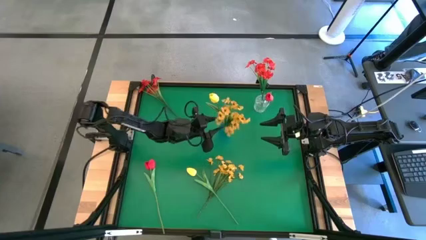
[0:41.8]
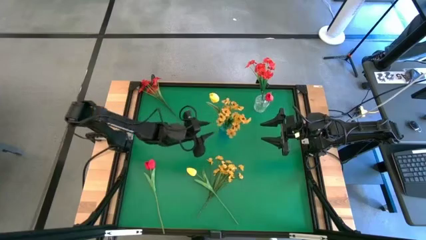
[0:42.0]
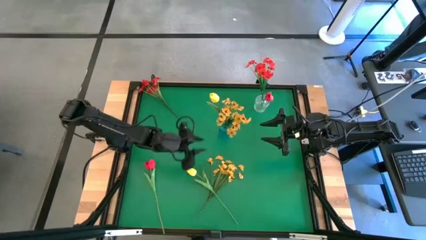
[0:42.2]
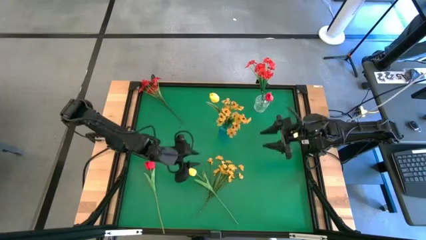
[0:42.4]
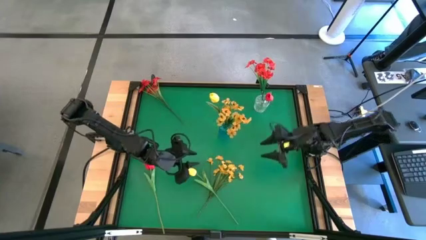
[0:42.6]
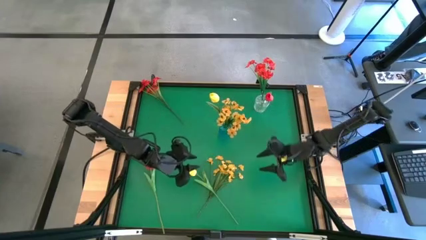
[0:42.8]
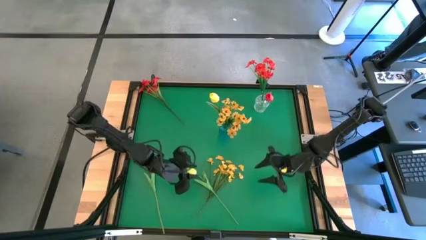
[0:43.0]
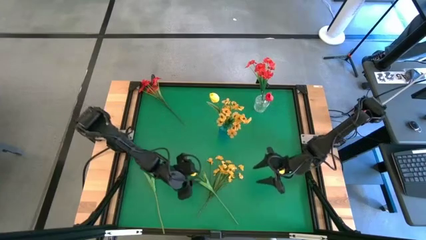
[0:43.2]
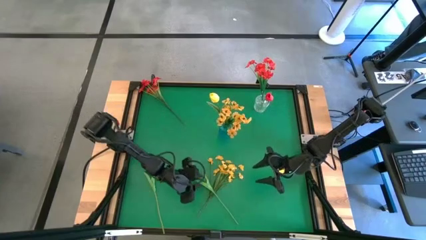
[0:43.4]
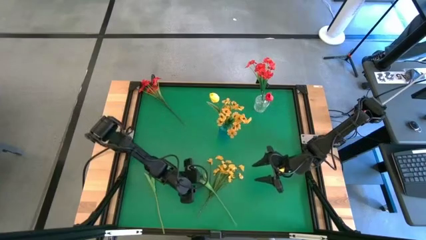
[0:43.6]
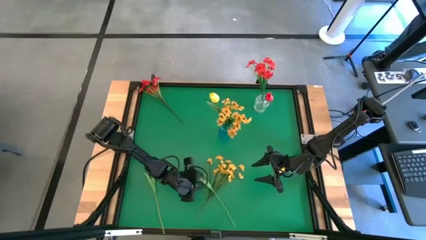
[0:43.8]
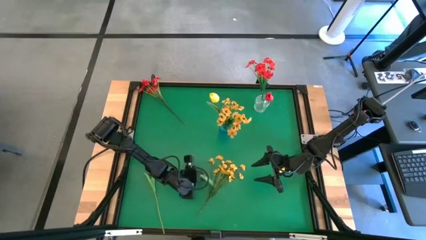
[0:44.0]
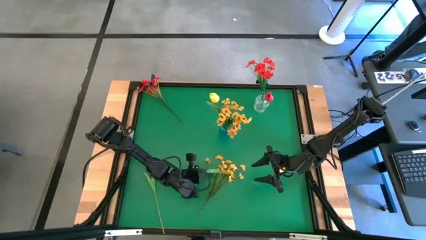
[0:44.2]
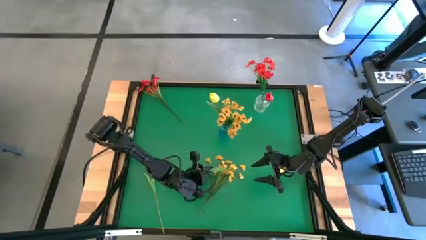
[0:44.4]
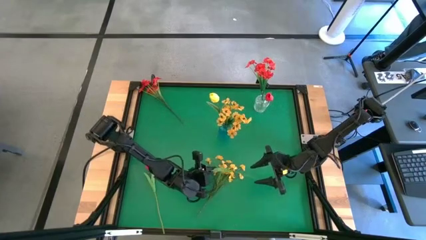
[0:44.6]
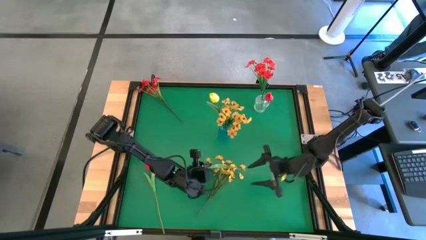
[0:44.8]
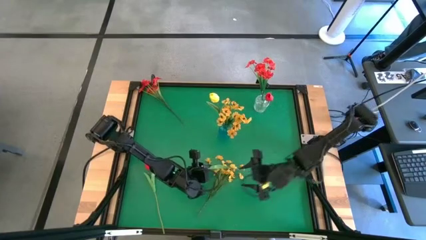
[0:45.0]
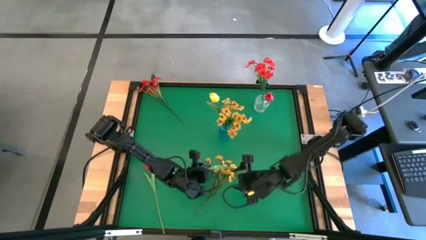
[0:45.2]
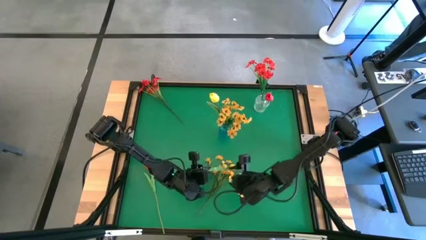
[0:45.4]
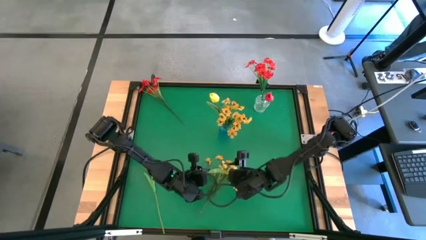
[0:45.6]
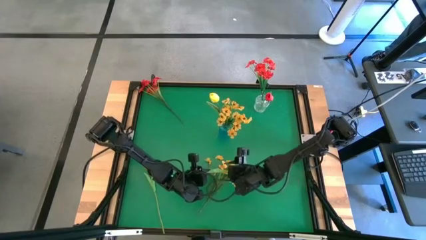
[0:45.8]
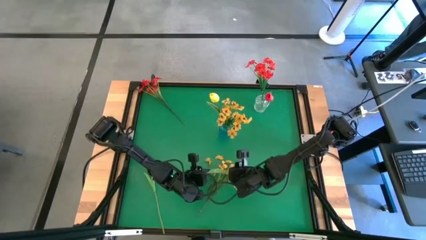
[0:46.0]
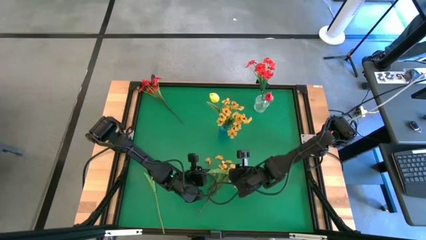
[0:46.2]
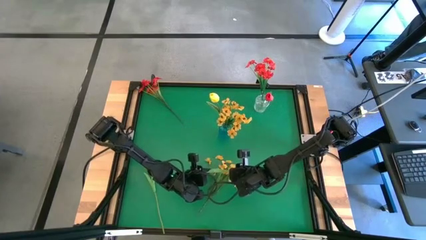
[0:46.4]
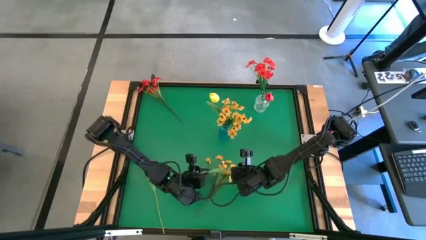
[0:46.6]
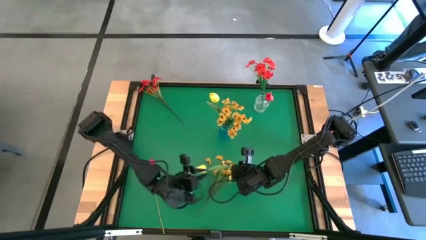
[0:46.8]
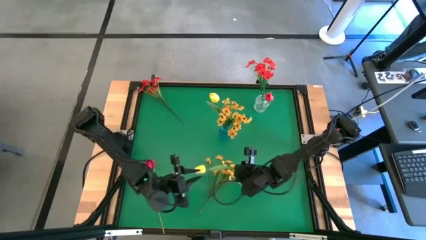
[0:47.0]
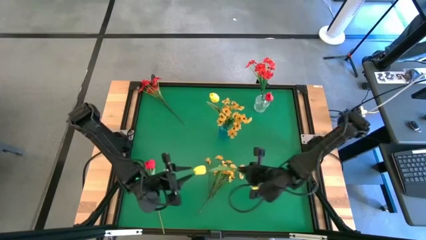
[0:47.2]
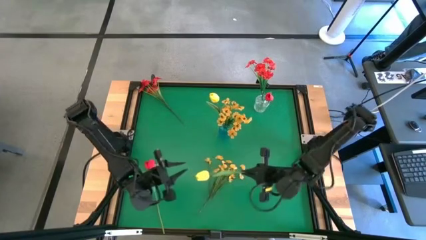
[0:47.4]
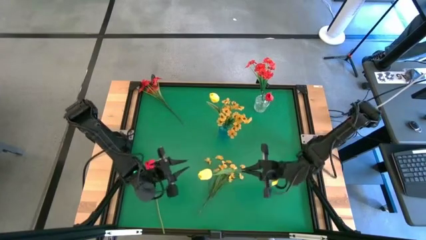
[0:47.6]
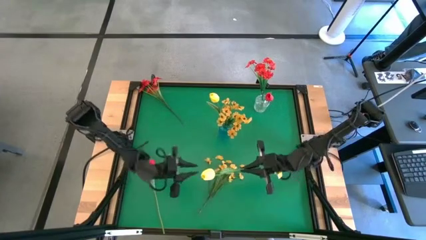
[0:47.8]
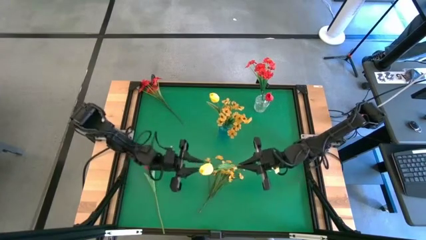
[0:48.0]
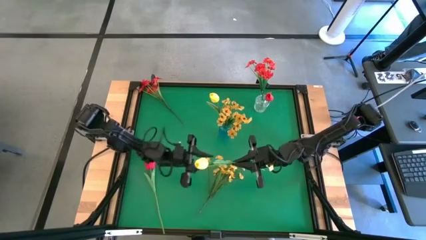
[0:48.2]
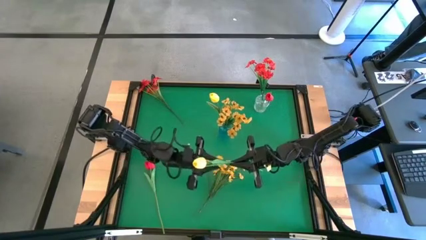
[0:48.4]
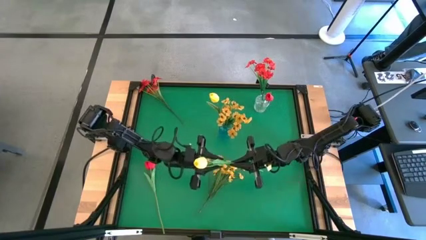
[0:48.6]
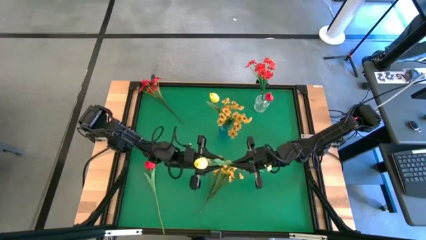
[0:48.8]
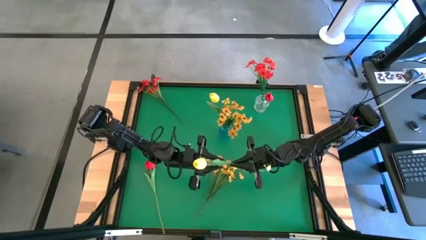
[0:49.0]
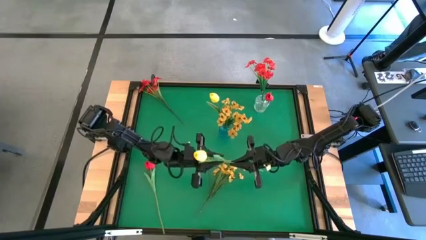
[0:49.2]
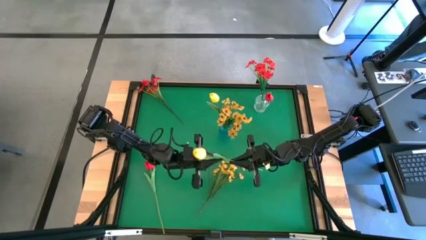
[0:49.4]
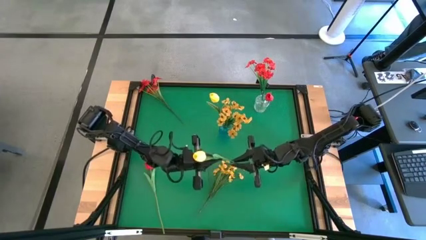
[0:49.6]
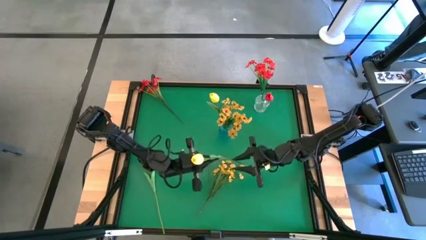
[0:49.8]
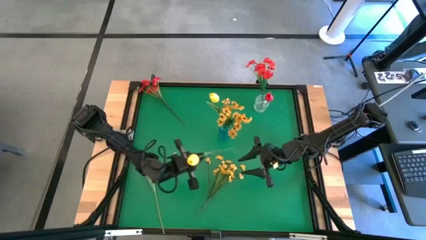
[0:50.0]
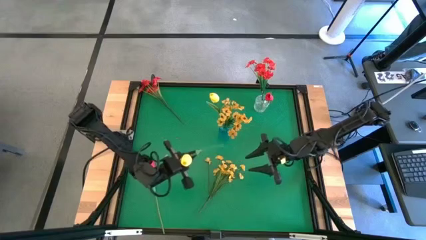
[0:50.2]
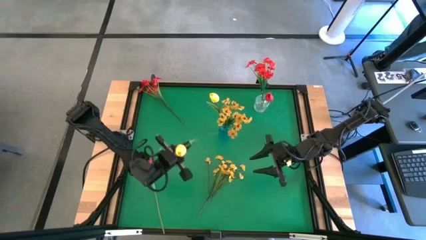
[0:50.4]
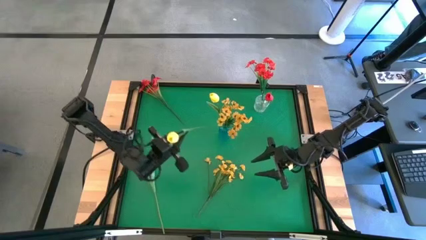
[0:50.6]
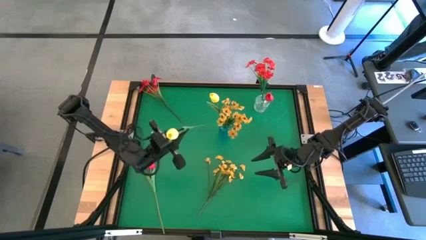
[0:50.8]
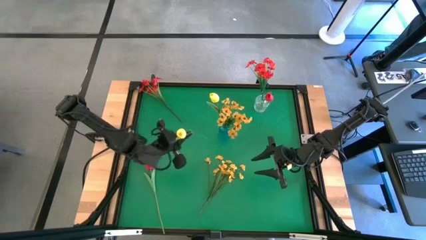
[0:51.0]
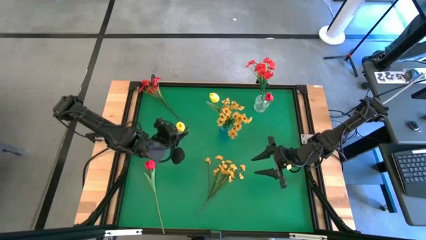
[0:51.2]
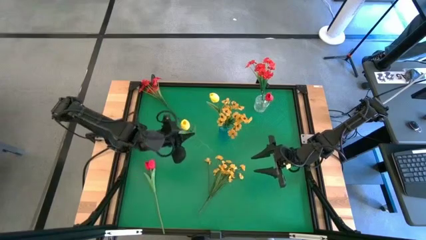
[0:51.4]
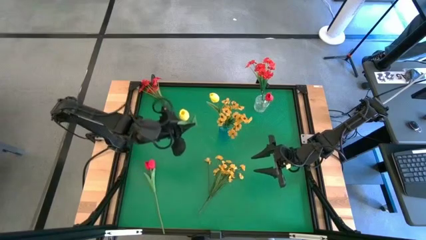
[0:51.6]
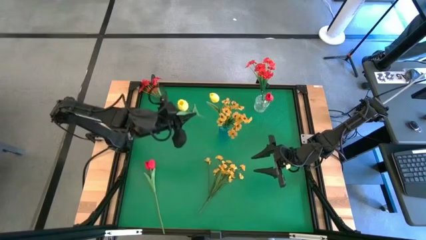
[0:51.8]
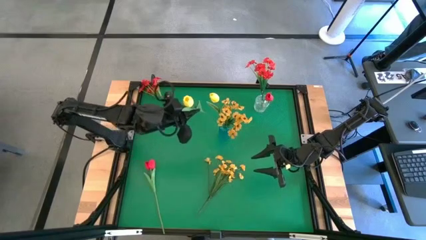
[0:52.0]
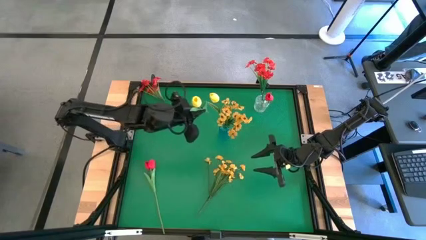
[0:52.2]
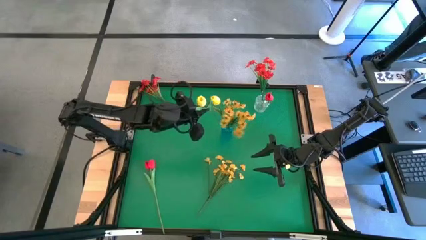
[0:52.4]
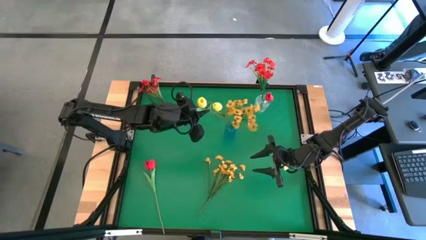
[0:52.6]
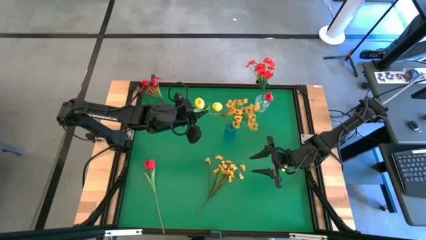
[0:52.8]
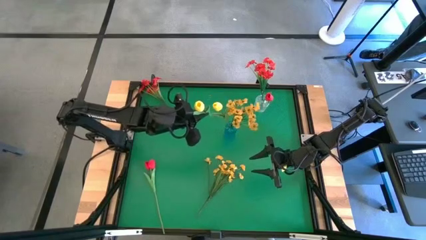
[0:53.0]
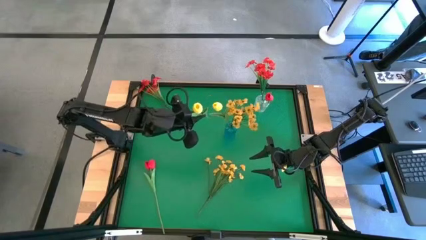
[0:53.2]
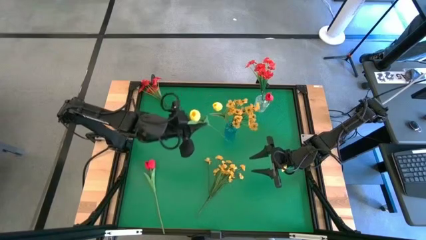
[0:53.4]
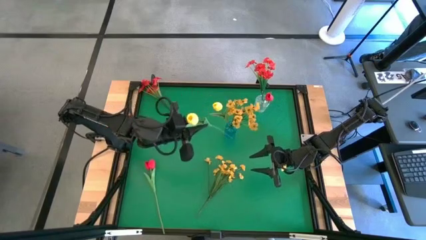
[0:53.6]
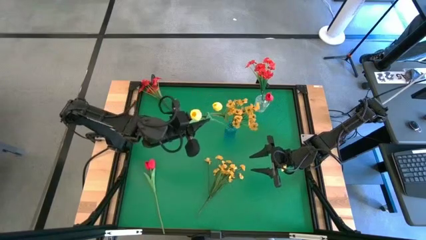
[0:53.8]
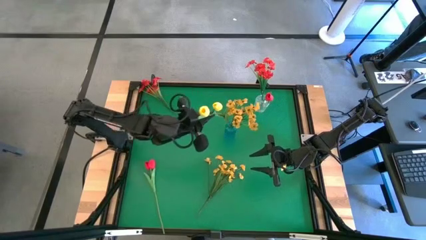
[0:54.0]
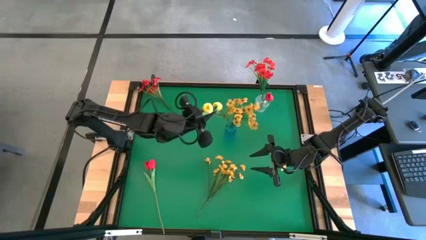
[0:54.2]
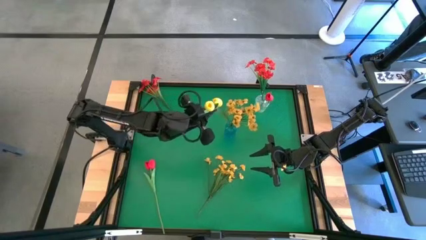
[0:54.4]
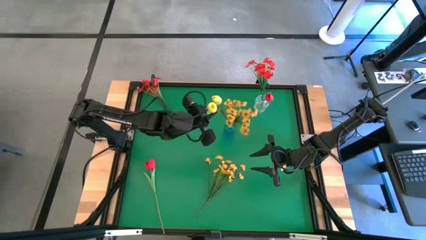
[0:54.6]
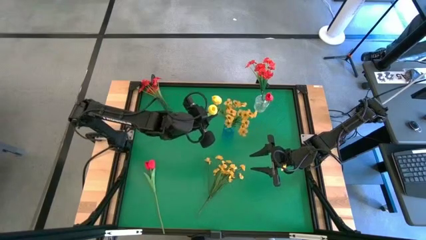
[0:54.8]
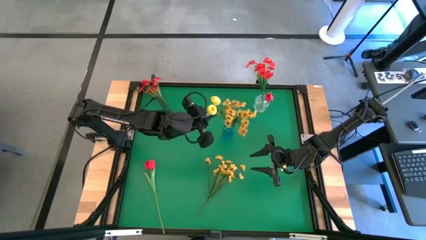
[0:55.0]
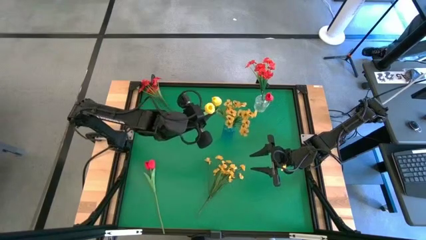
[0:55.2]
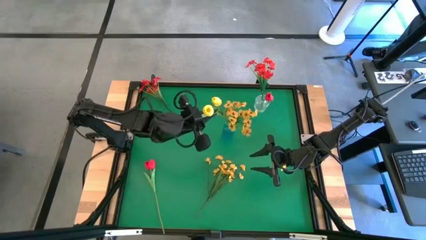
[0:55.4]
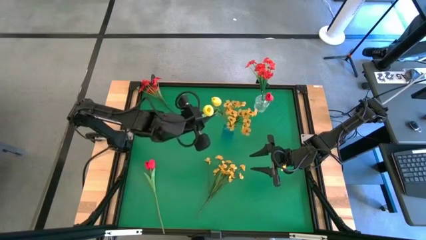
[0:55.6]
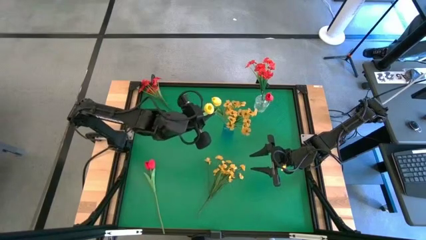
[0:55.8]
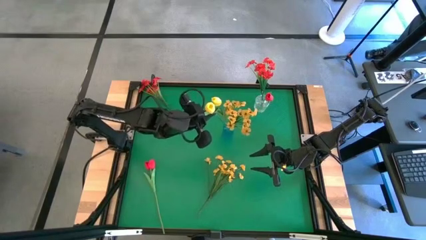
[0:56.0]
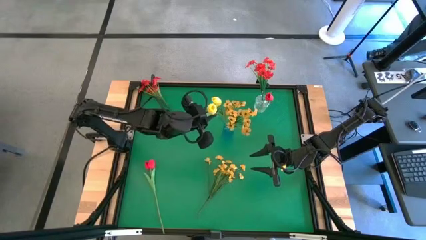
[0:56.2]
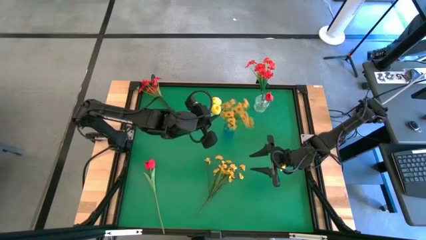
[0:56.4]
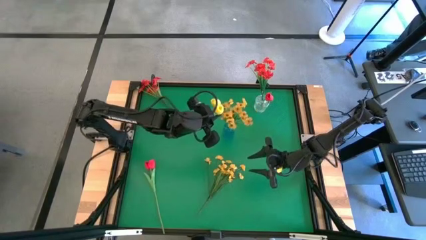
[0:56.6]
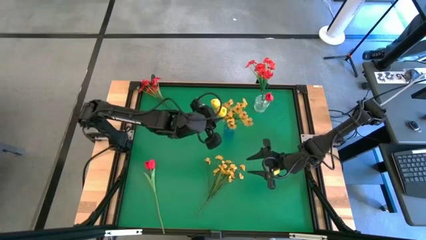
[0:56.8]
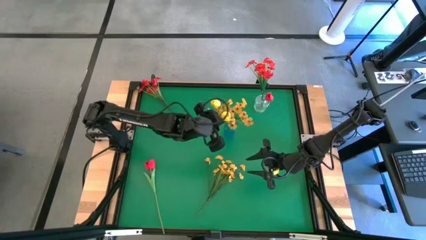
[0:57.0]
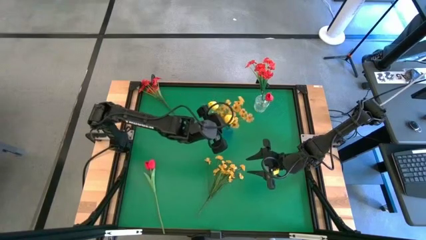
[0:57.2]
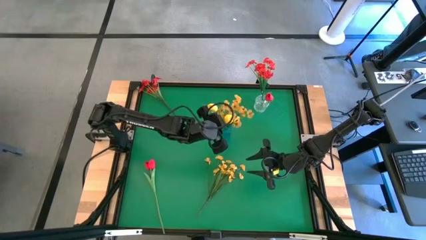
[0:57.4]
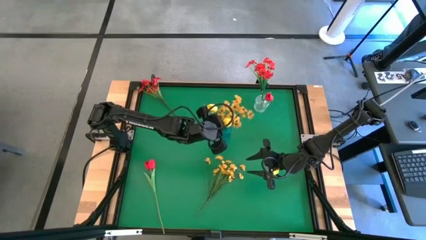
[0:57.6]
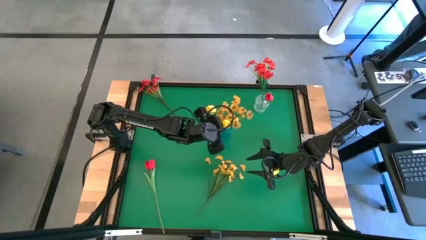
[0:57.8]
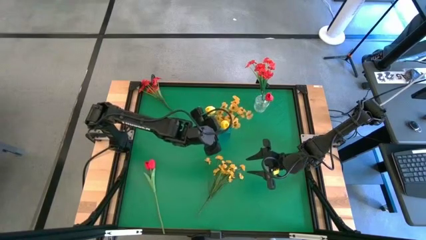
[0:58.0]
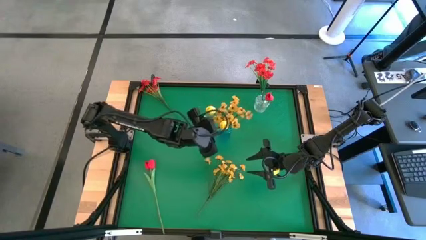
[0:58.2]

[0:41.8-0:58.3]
Task: Sort flowers into vase by color
Put the yellow flower into the blue crystal vase
